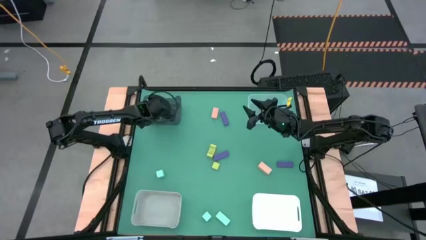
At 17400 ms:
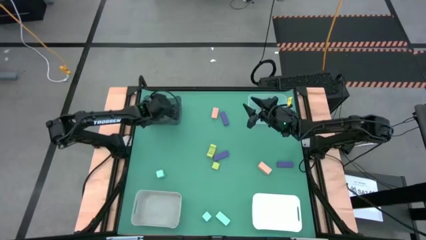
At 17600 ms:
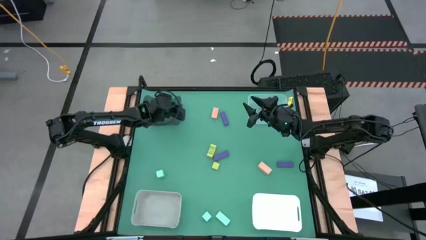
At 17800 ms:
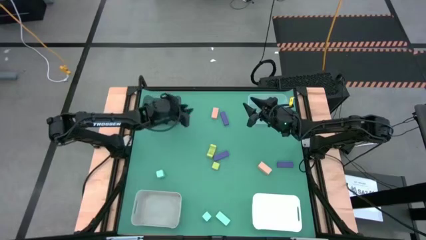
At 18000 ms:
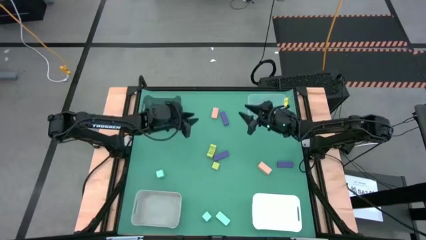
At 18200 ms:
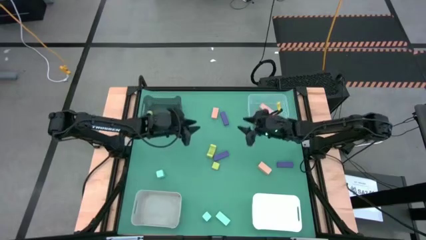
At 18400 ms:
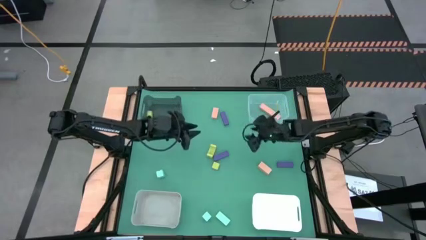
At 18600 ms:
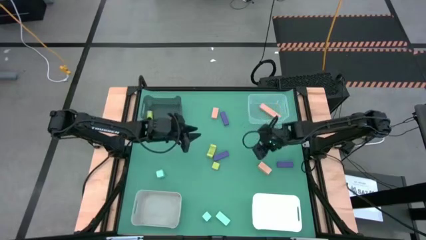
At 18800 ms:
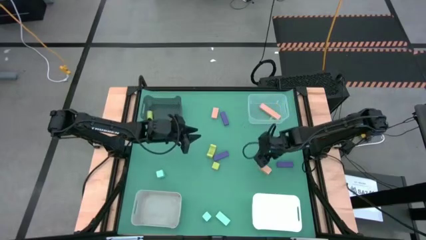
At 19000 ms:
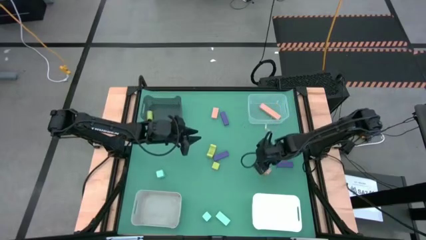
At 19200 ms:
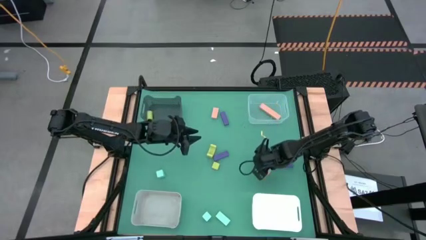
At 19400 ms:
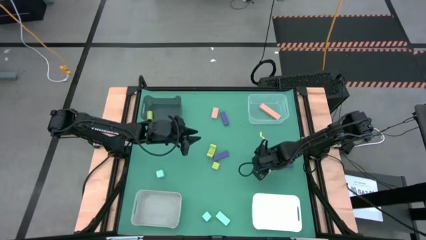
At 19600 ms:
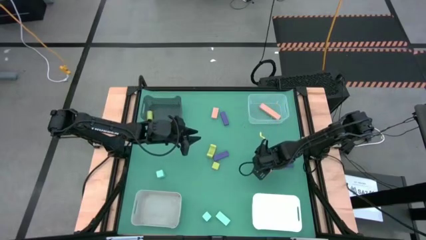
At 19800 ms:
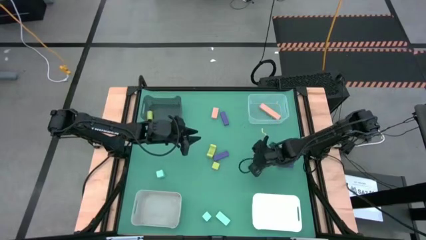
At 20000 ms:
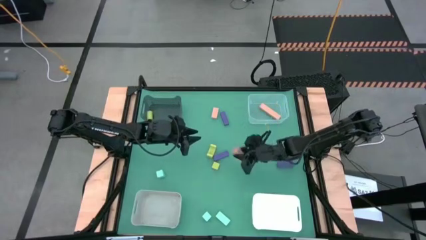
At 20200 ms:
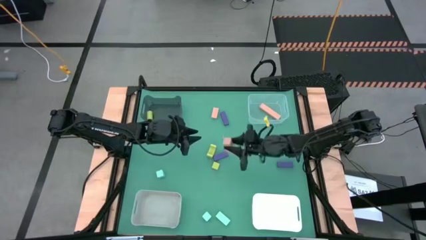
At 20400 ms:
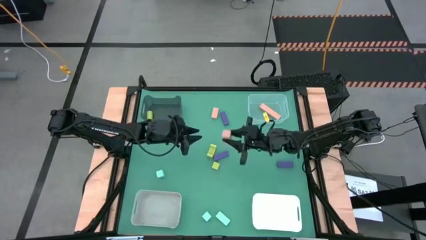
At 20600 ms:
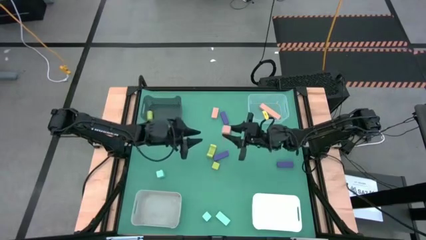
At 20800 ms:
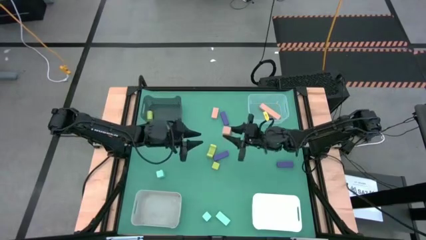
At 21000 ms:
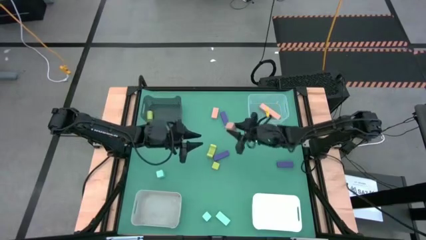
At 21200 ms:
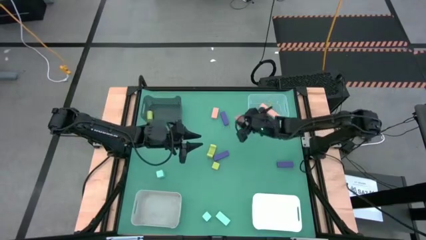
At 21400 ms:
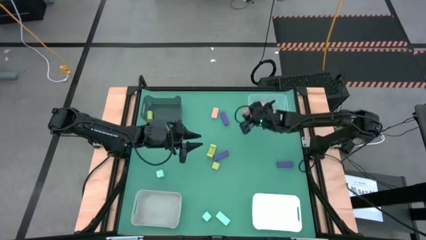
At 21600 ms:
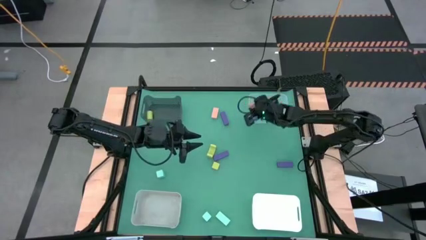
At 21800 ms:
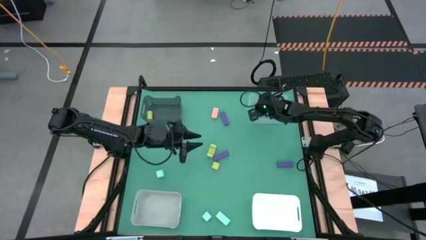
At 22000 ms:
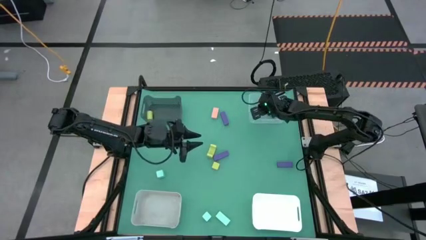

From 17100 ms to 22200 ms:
Task: Sort & place blocks by color
Put the bottom peach orange block into the transparent bin

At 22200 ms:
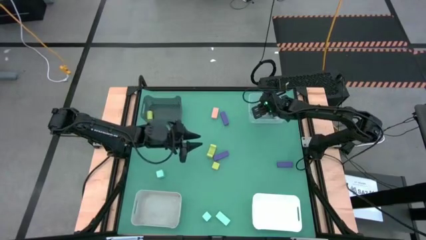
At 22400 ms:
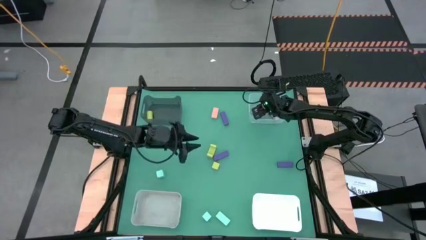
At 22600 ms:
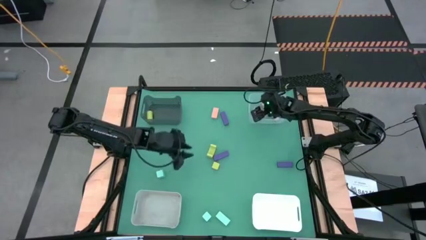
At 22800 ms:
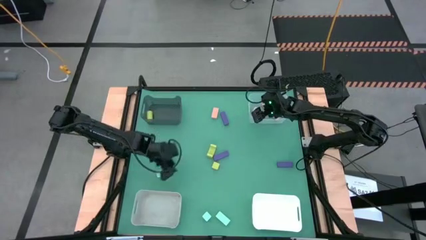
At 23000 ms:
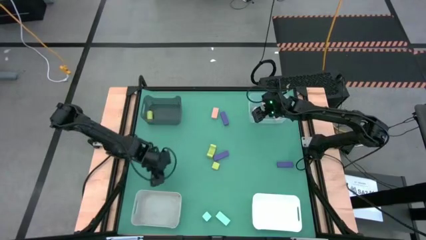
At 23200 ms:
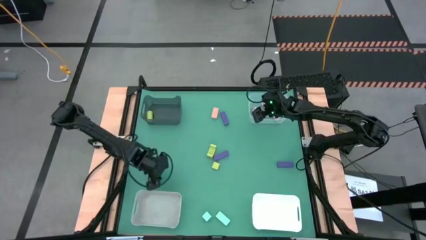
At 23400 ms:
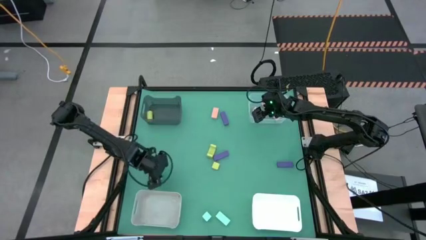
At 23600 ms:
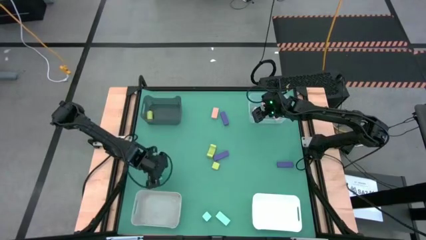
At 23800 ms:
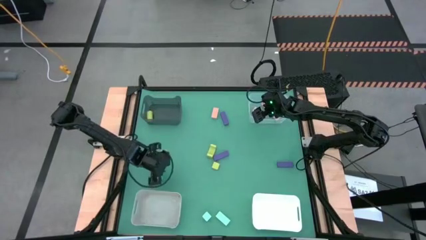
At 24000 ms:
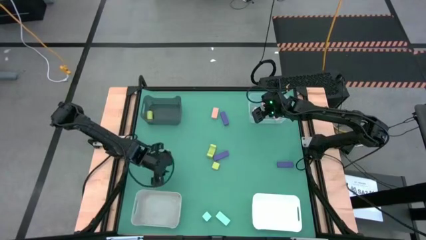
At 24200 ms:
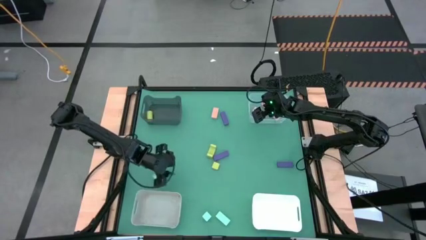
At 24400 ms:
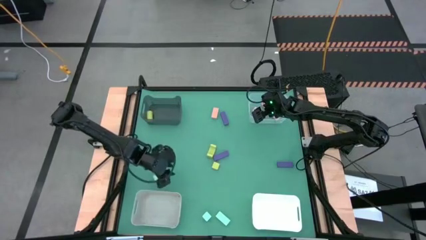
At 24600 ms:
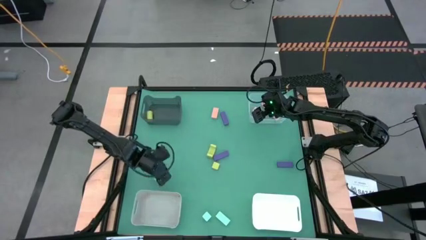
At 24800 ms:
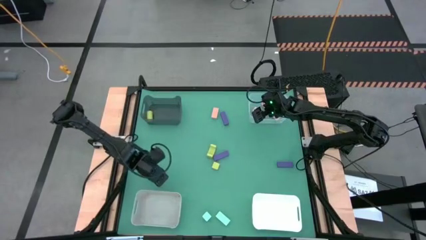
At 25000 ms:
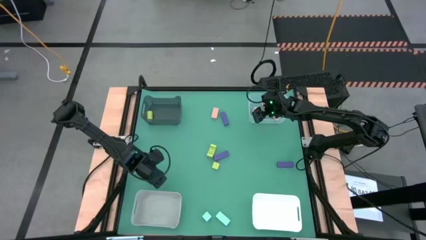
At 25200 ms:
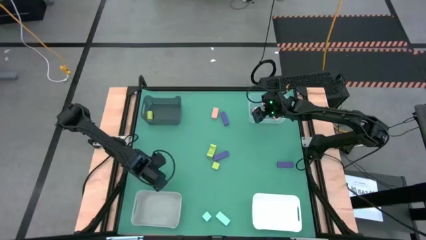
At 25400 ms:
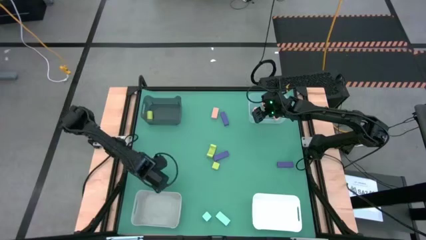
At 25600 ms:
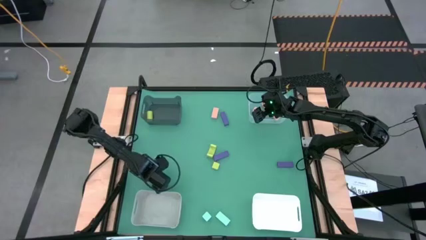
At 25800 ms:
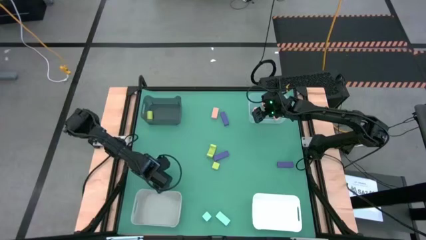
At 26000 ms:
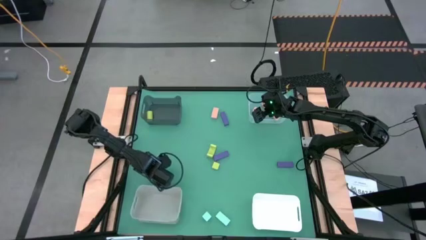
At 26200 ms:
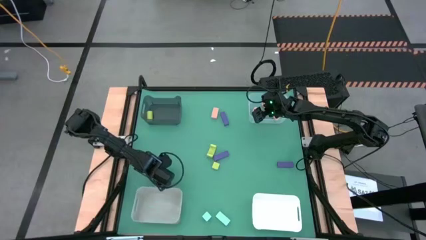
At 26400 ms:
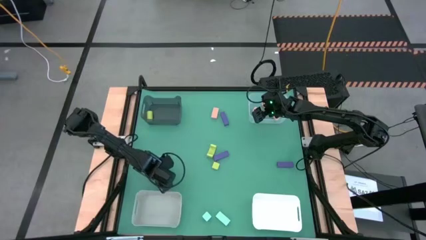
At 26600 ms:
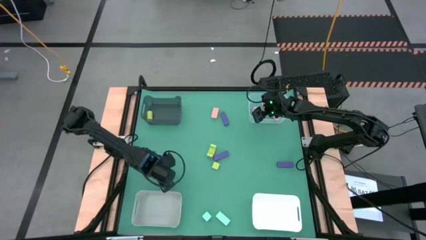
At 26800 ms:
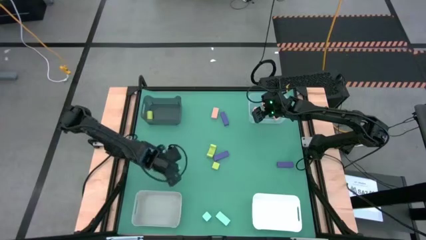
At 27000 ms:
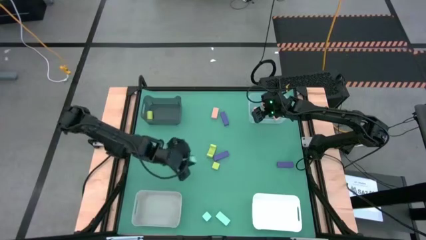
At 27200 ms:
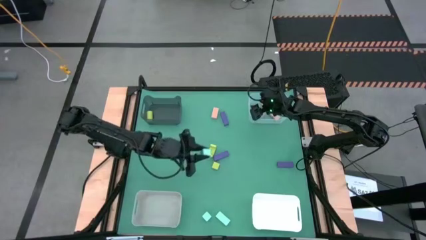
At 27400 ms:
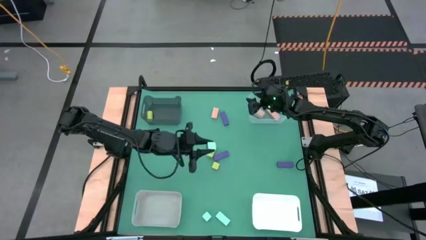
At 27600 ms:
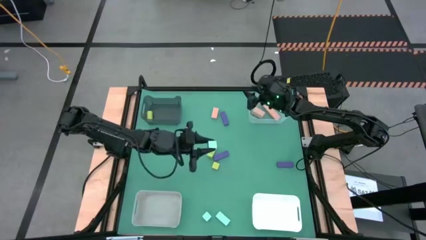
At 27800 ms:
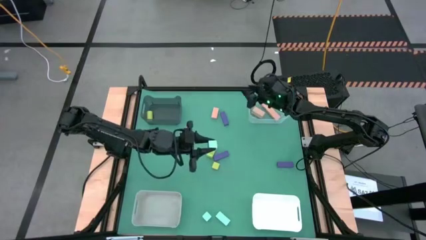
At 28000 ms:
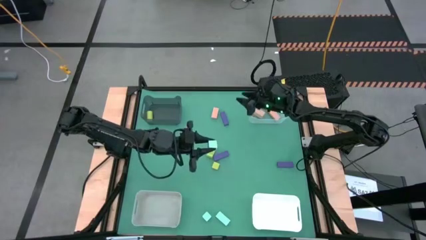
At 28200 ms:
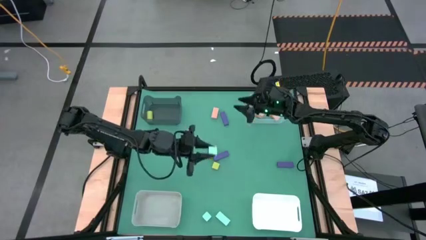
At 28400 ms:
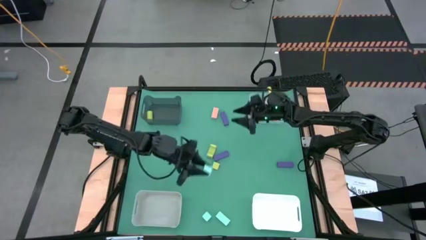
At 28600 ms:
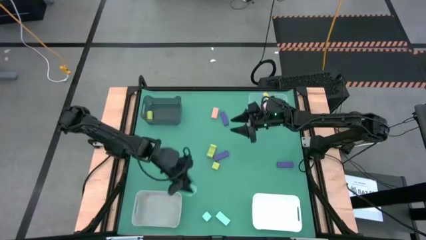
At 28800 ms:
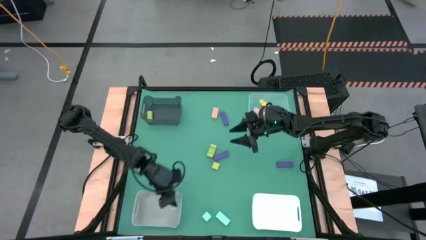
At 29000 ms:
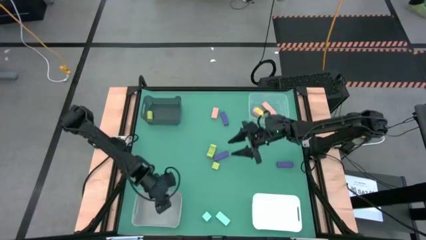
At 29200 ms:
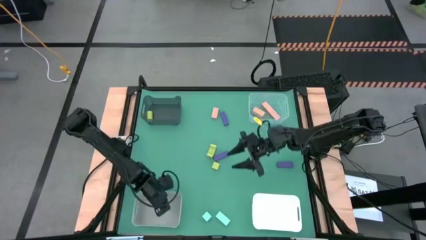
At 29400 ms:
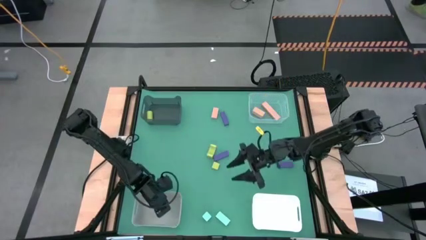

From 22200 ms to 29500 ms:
Put the top light blue block into the gray bin

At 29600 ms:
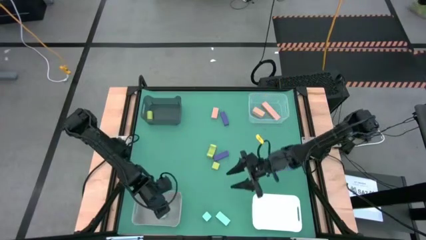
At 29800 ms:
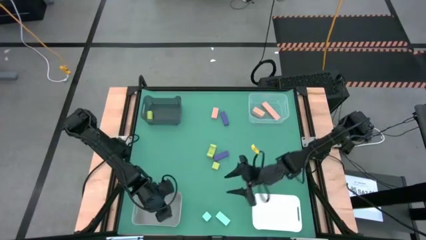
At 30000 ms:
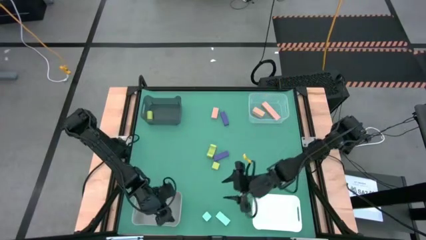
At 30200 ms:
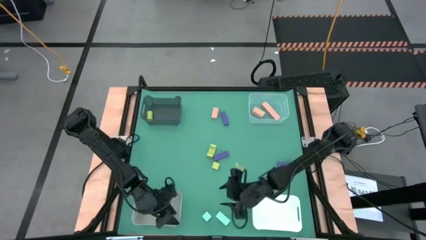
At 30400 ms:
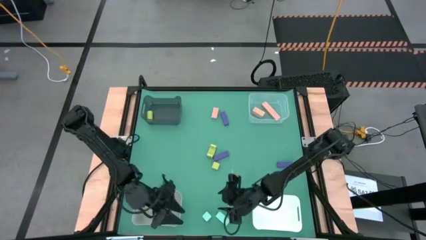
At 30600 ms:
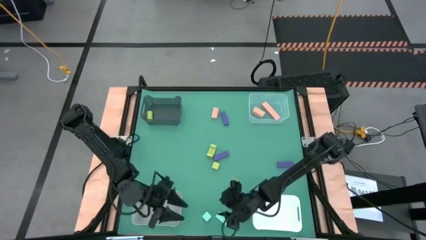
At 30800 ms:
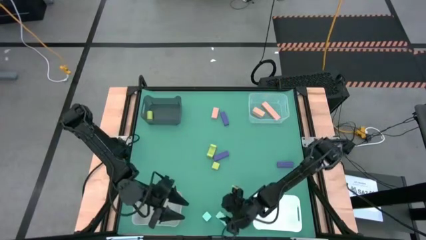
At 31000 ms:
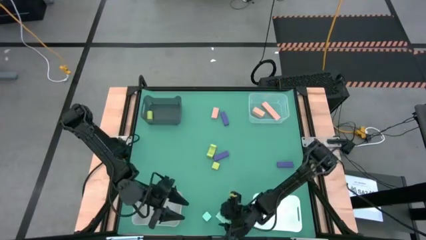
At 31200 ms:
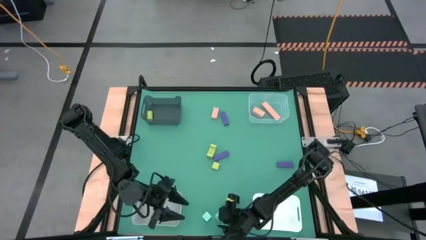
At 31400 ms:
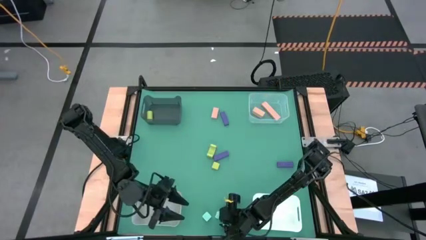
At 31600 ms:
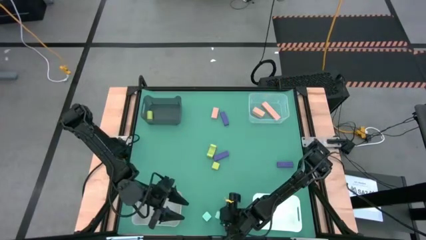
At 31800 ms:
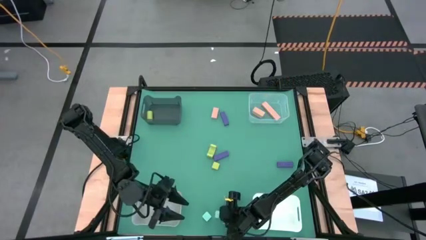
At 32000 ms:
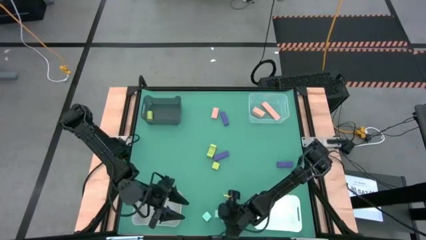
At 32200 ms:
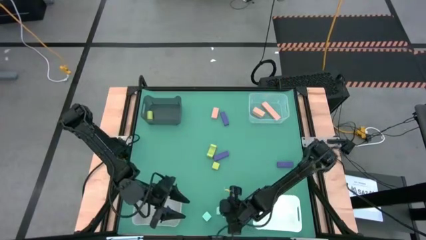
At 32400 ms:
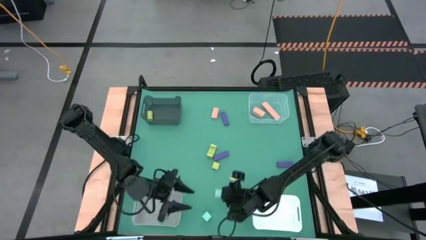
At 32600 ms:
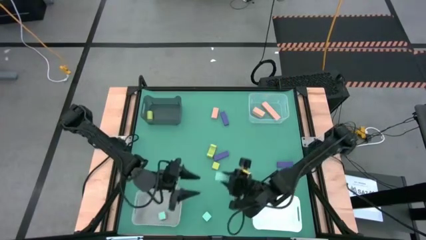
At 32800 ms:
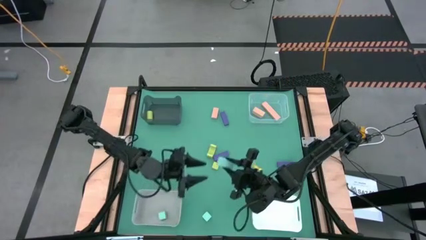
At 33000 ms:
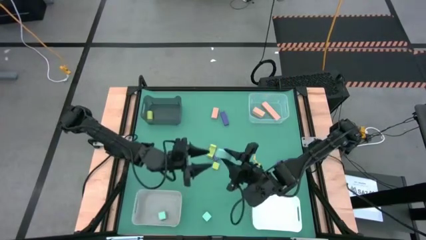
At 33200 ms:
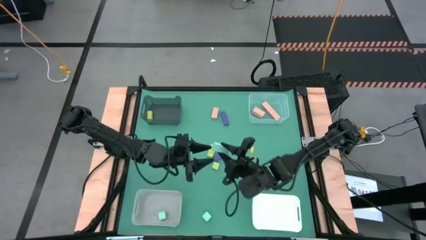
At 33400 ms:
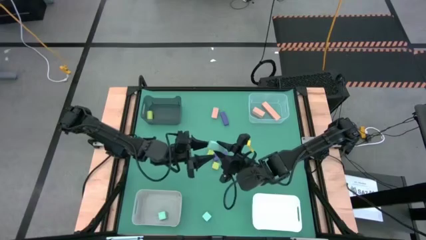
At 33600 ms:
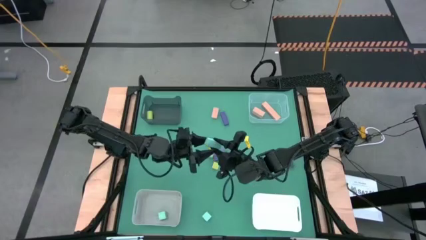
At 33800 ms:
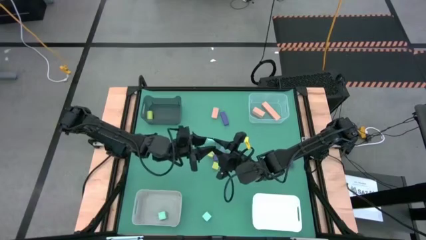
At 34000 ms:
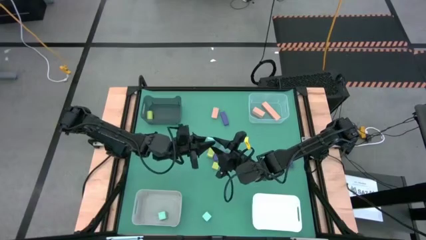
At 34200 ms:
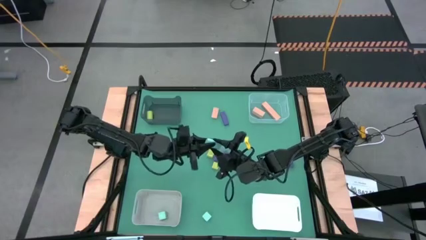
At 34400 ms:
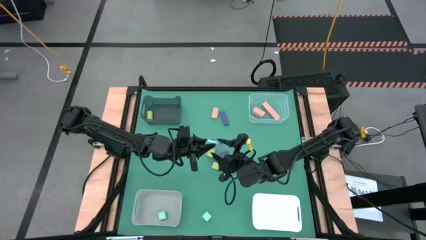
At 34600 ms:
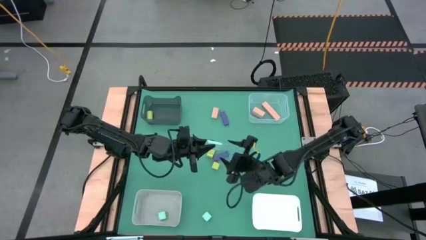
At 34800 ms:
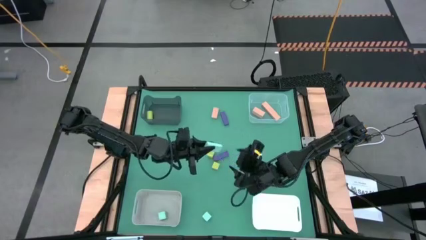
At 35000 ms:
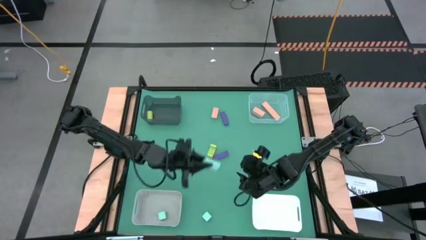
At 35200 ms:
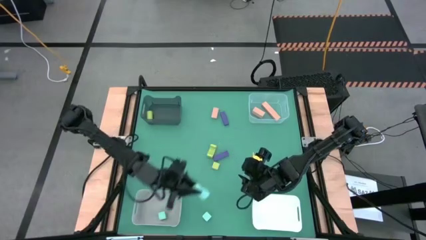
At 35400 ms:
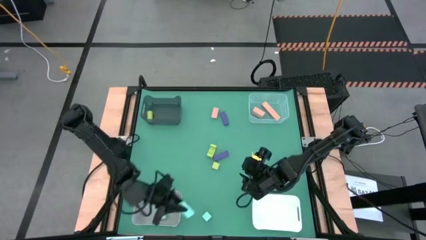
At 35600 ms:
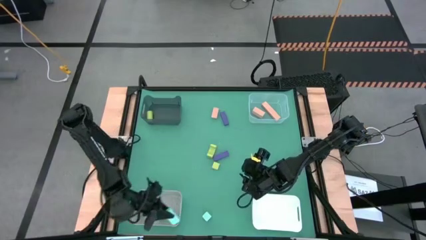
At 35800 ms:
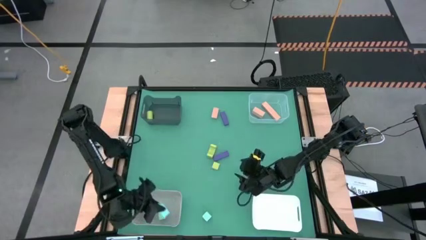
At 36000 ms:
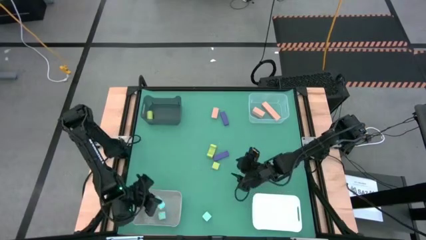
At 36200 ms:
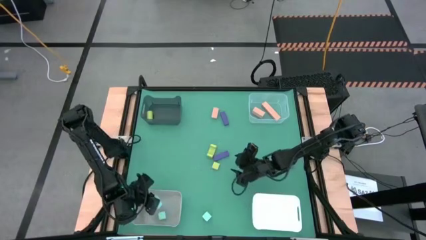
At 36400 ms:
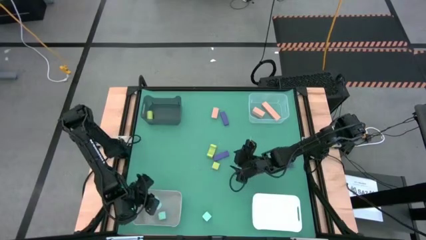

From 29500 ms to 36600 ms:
Put the right light blue block into the gray bin
